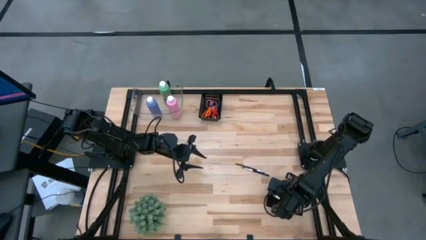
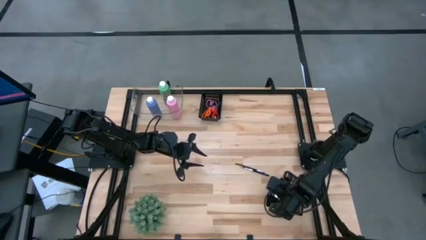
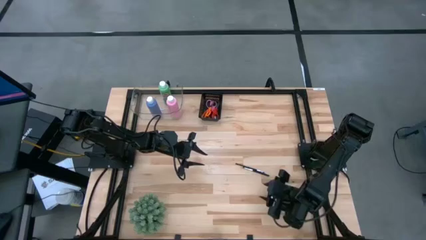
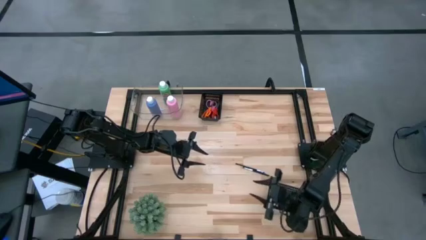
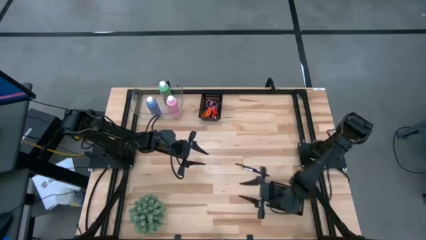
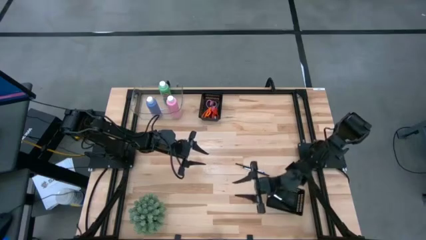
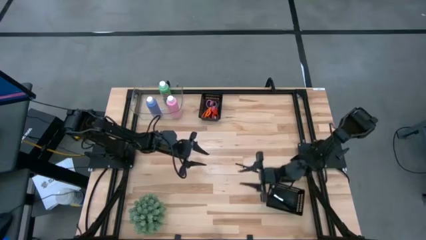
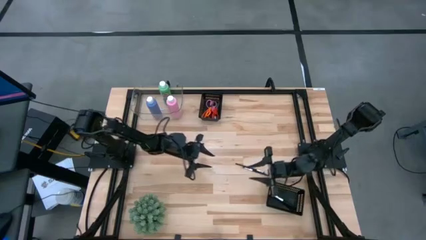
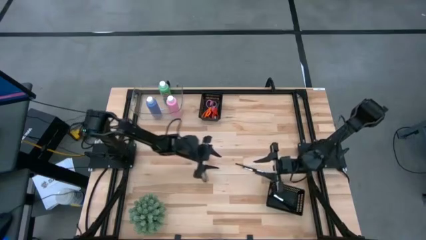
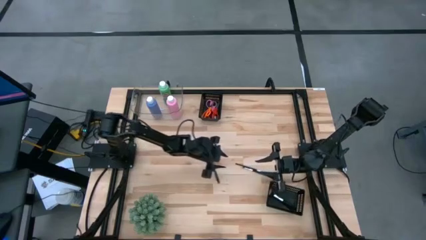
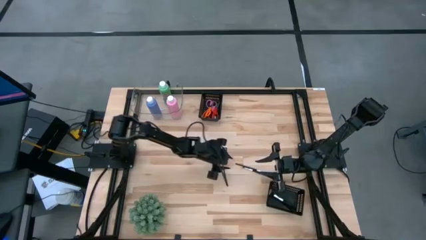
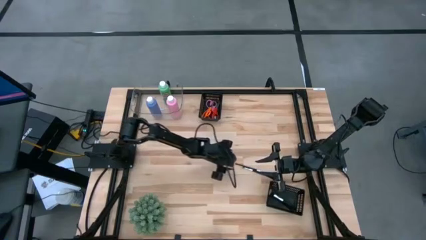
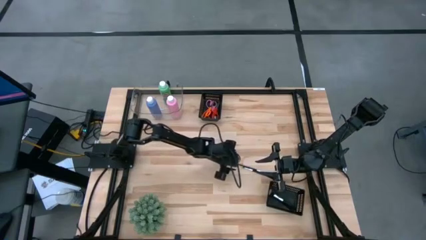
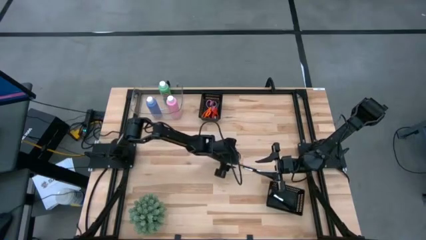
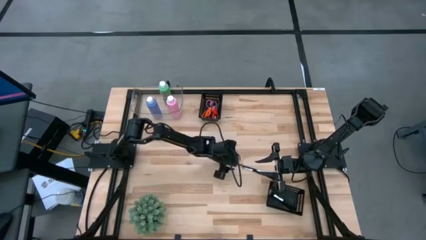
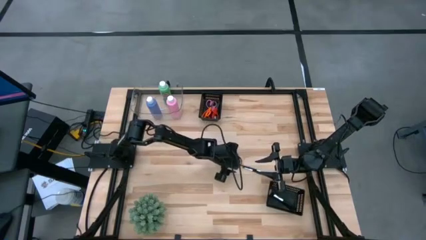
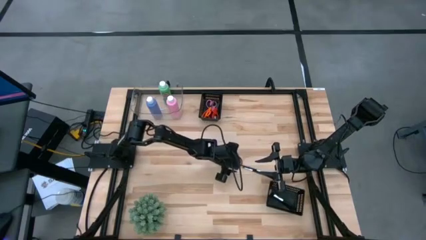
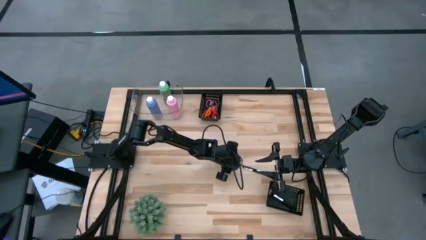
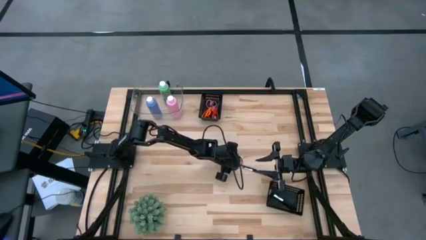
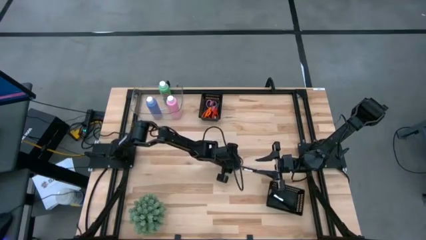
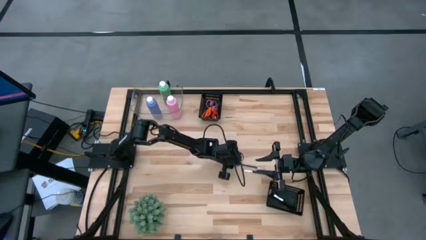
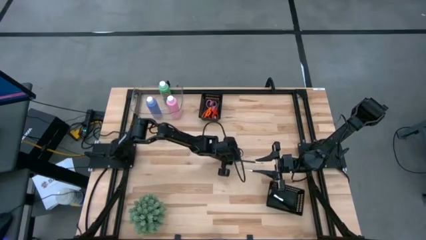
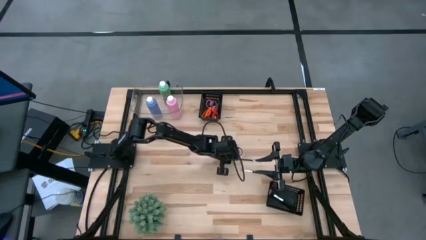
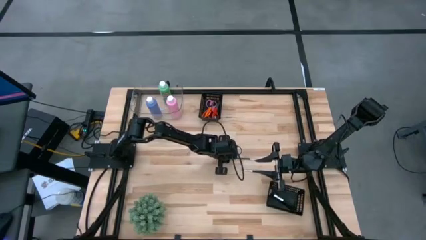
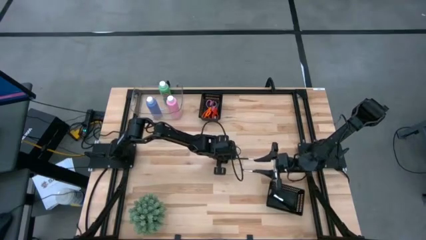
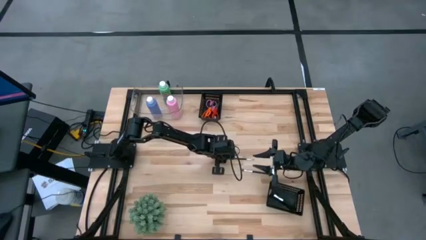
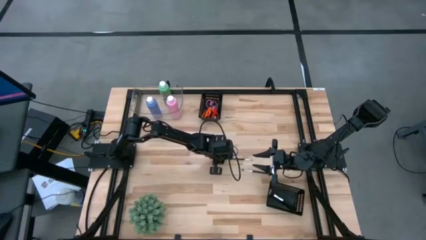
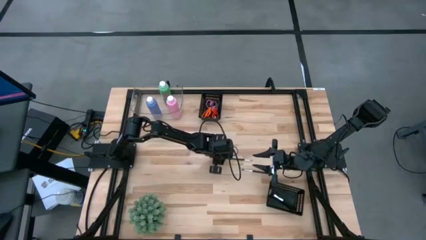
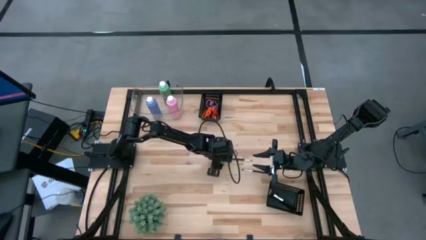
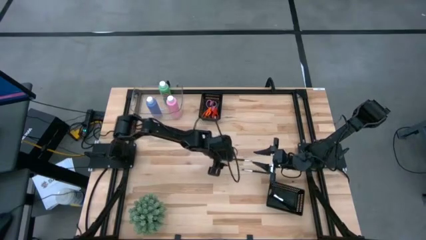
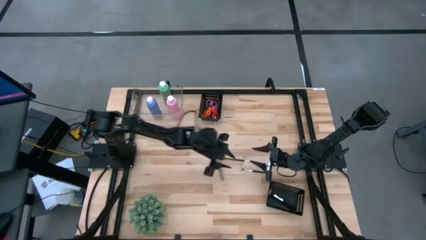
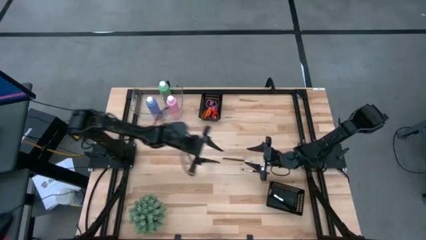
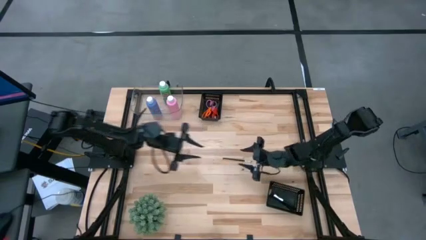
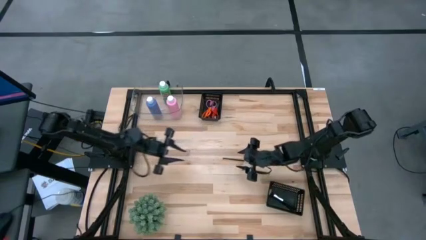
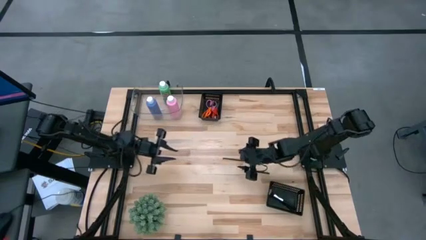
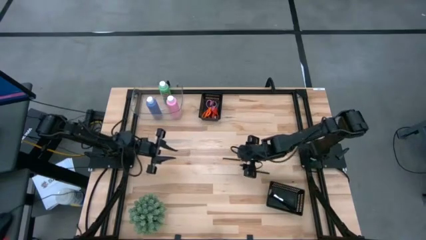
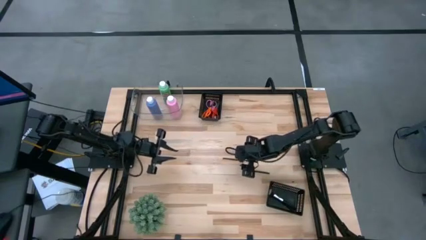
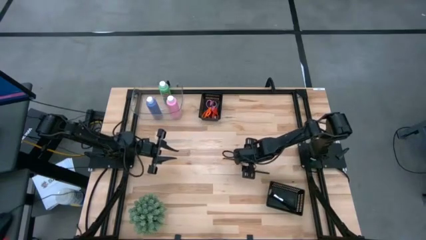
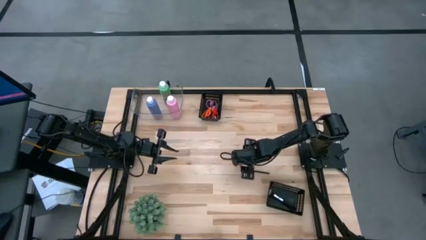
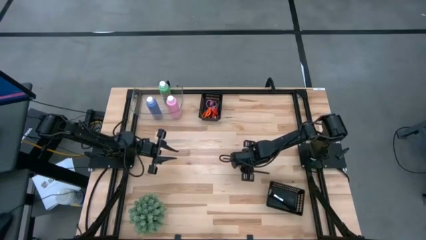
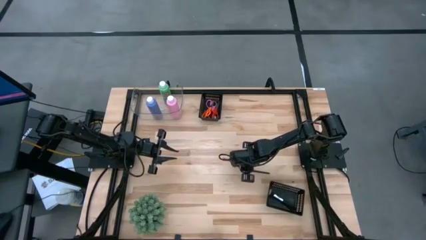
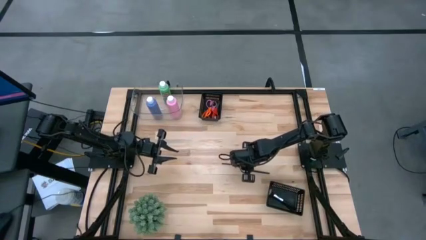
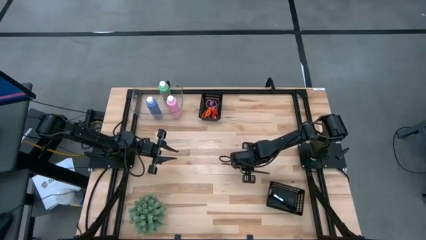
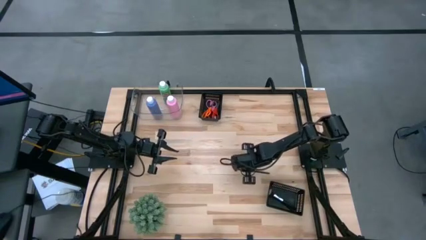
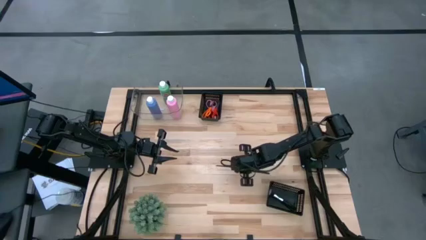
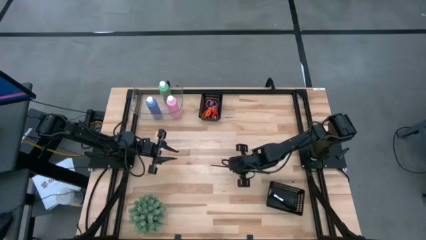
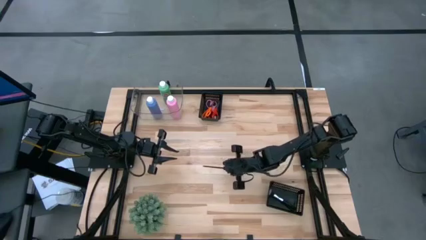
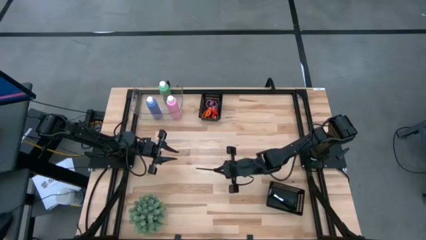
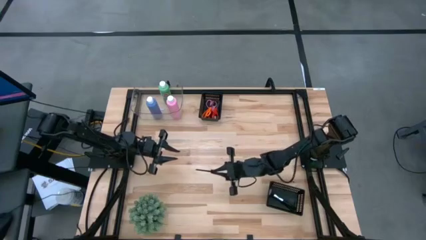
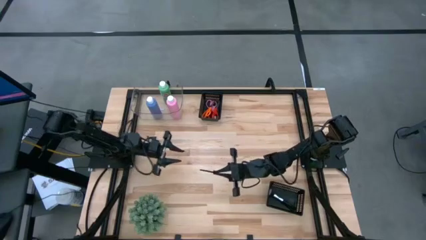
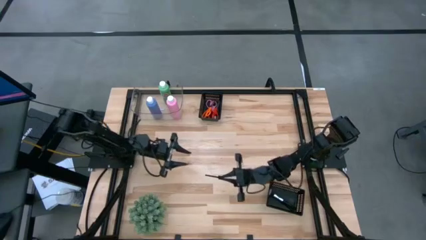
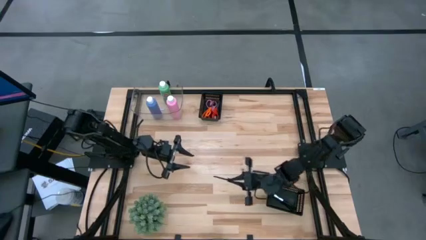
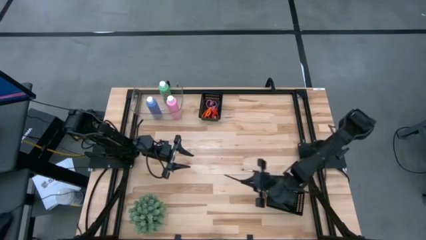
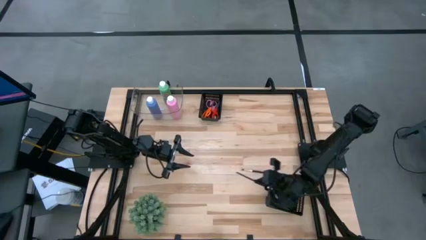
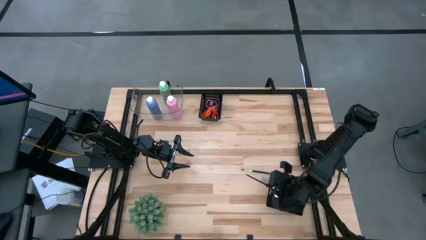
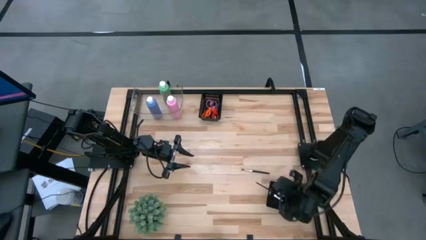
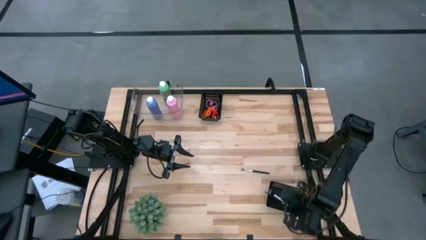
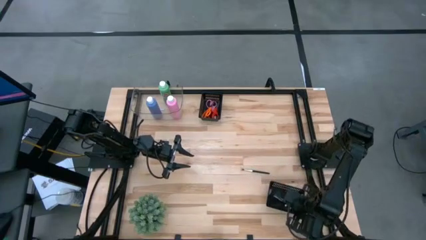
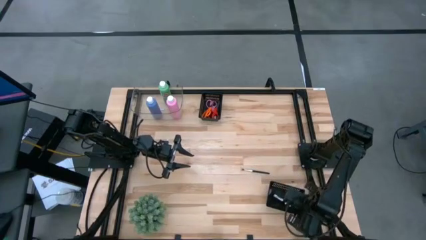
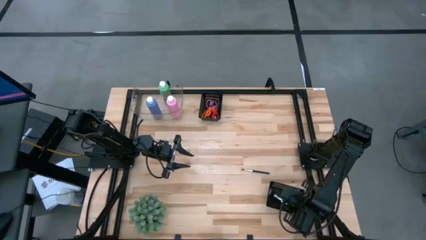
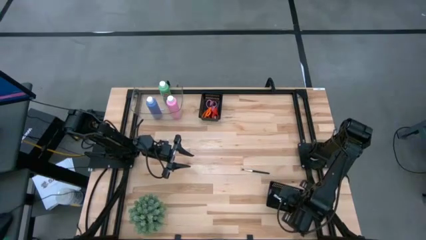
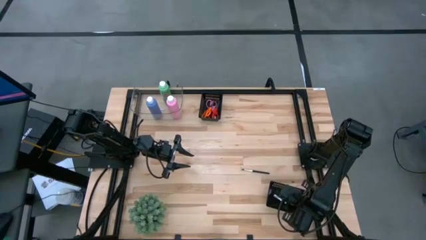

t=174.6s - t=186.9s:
Task: Pick & Place Paint Supplies
Put the black paint brush into the bottom black bin

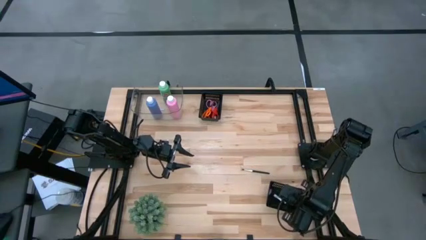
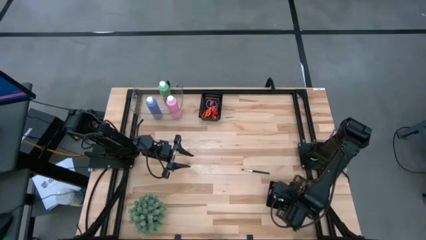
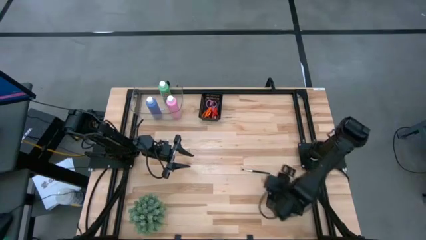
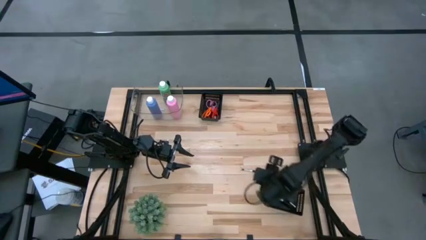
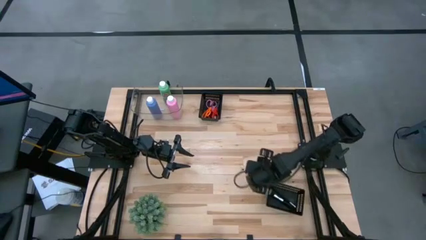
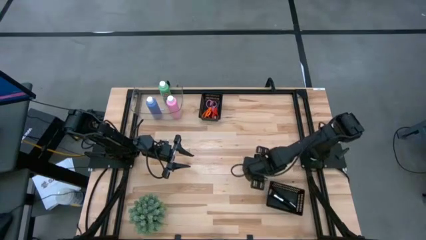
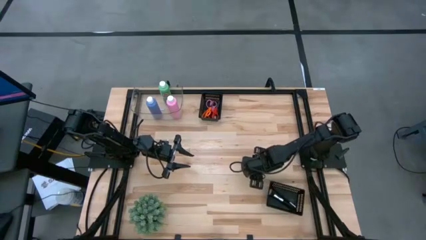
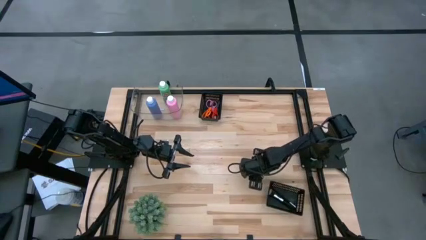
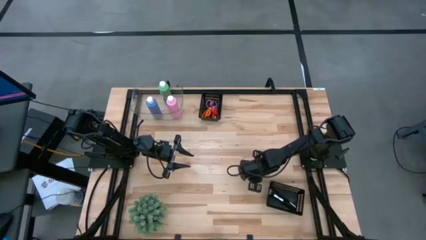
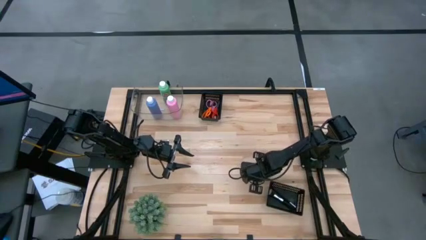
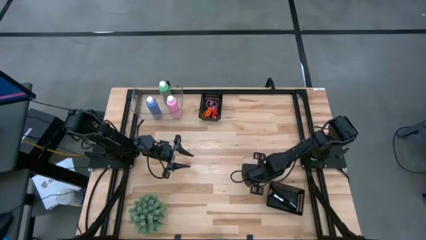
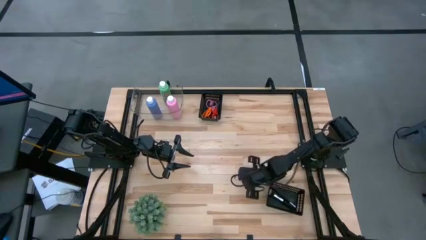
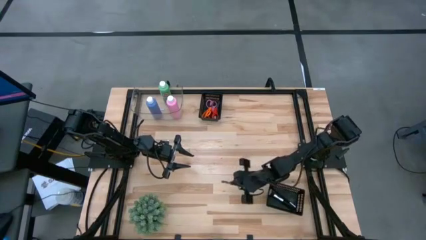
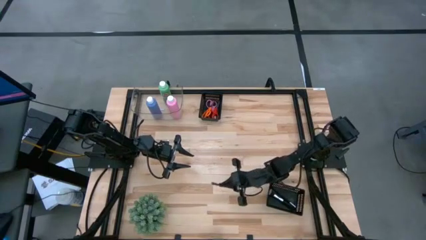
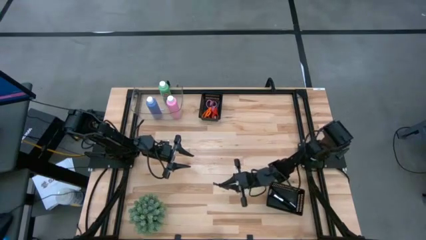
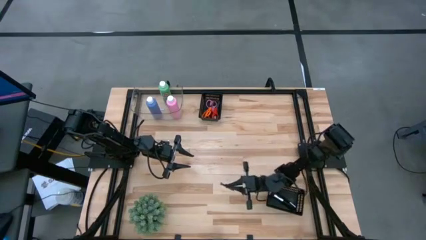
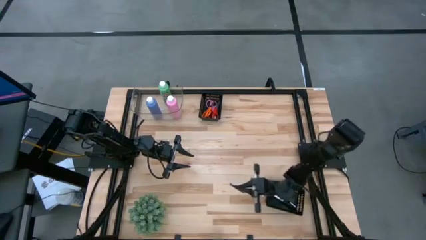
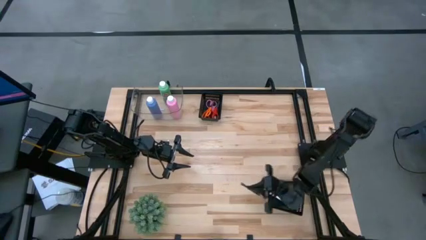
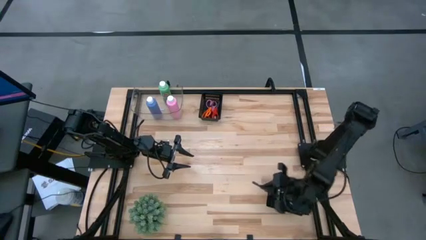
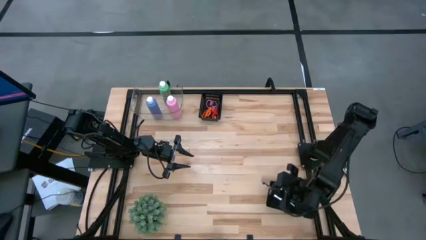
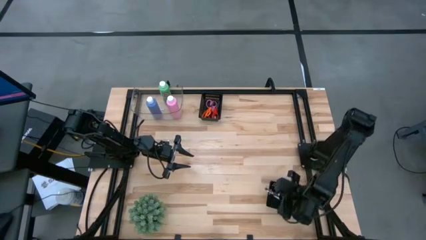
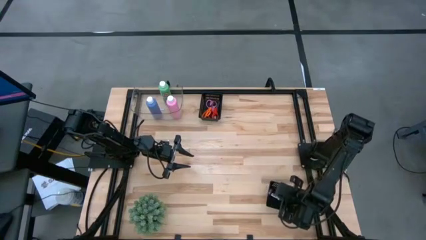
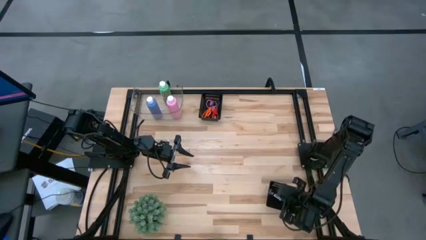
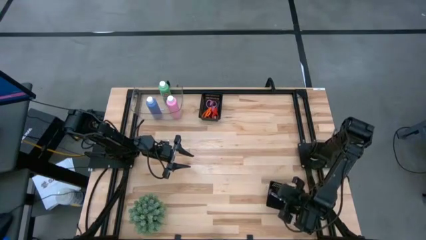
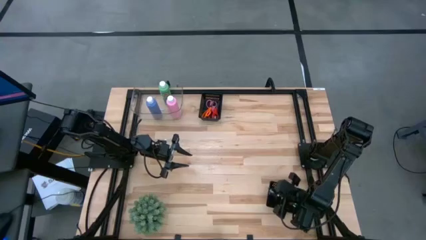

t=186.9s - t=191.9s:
Put the black paint brush into the bottom black bin
